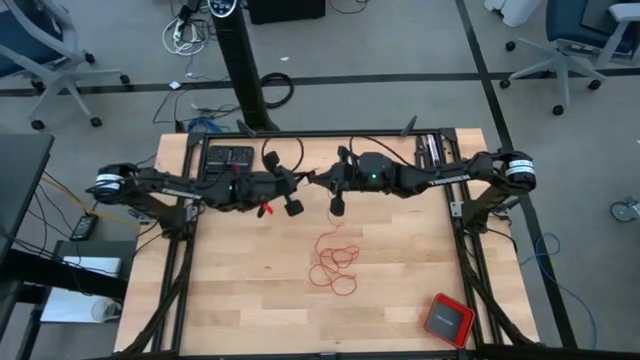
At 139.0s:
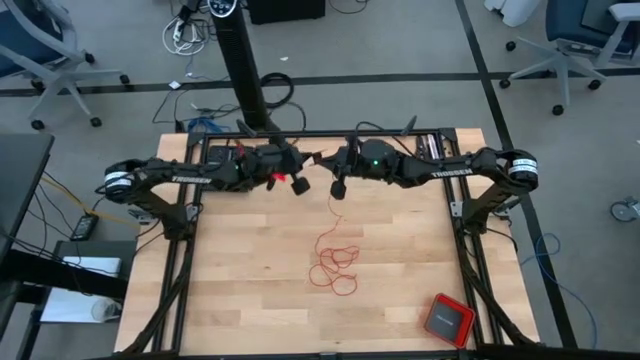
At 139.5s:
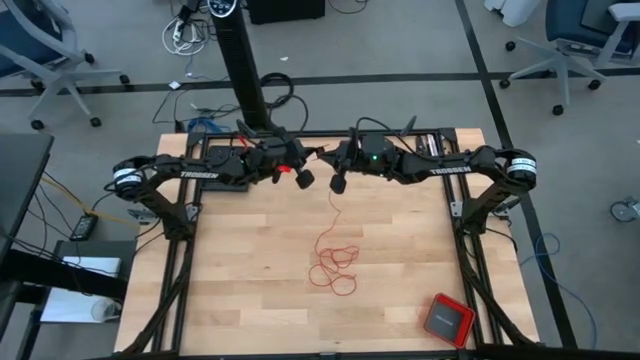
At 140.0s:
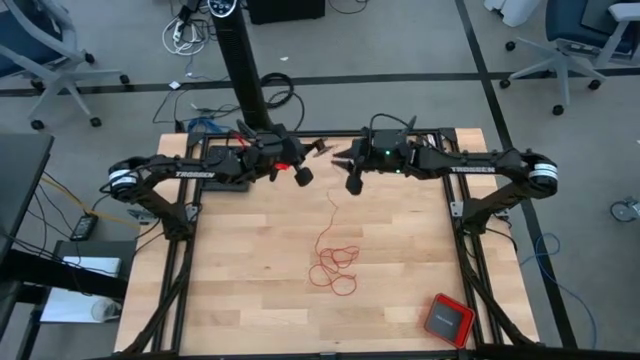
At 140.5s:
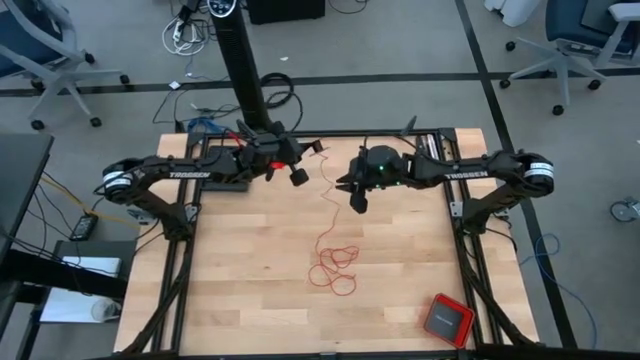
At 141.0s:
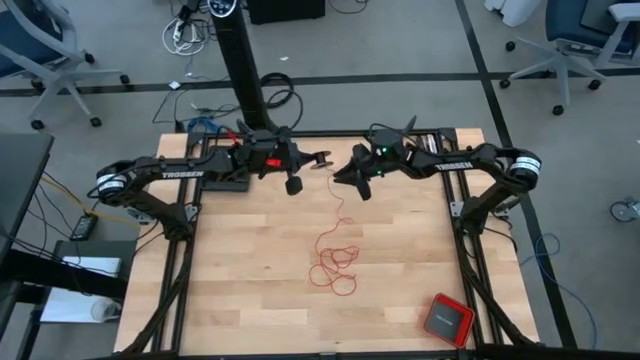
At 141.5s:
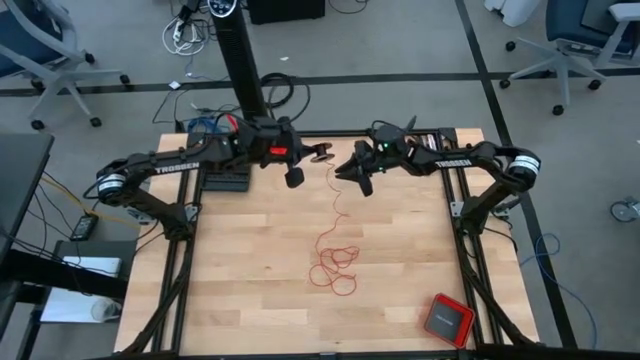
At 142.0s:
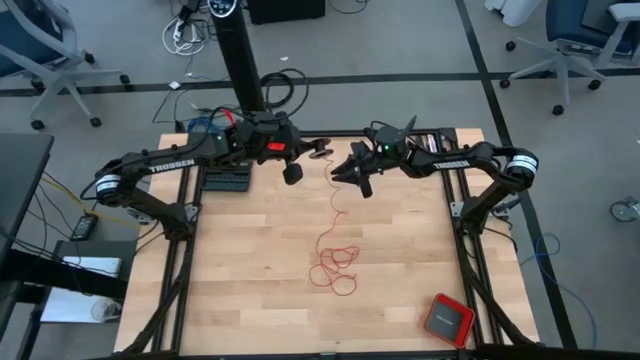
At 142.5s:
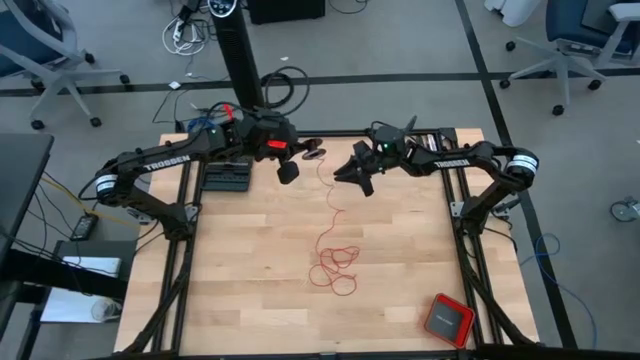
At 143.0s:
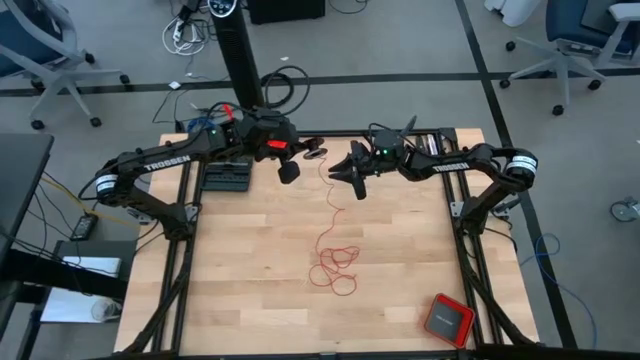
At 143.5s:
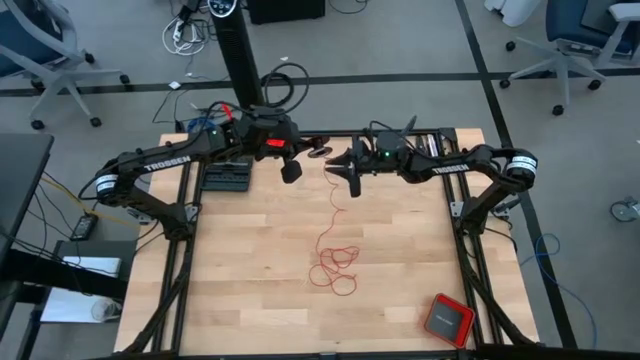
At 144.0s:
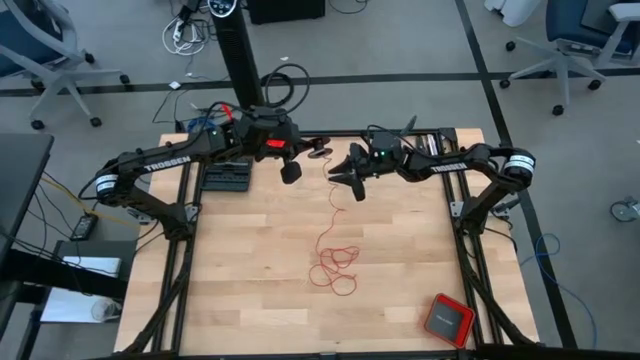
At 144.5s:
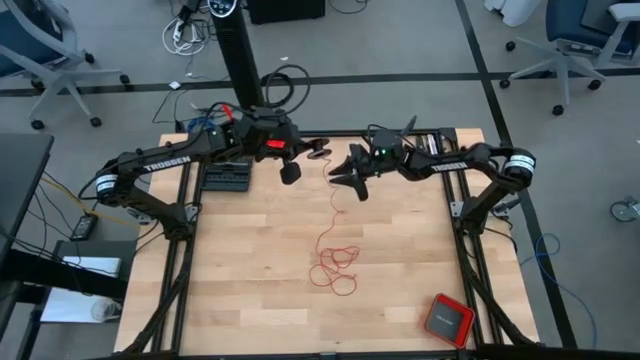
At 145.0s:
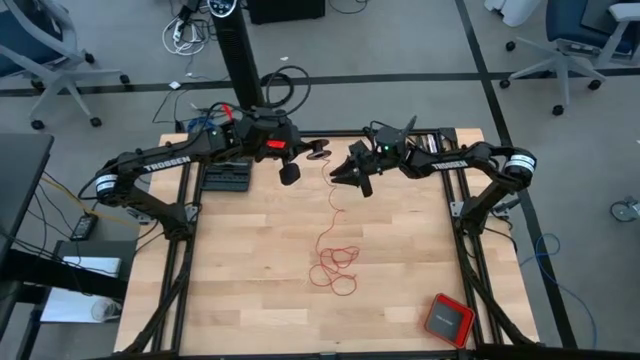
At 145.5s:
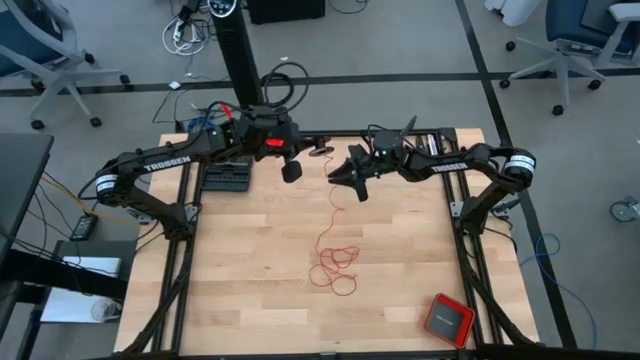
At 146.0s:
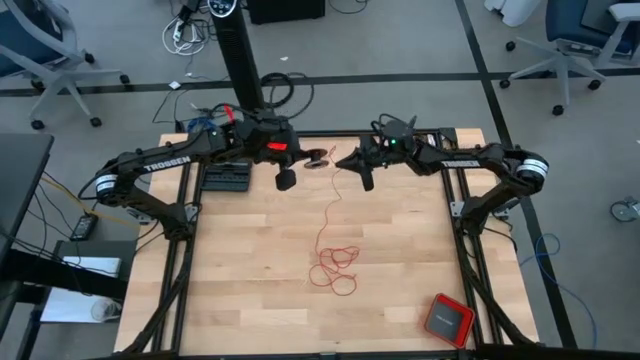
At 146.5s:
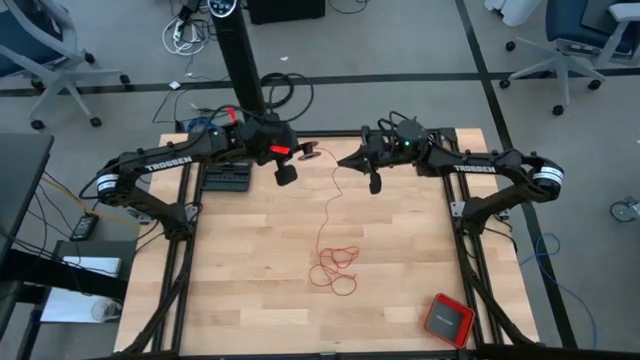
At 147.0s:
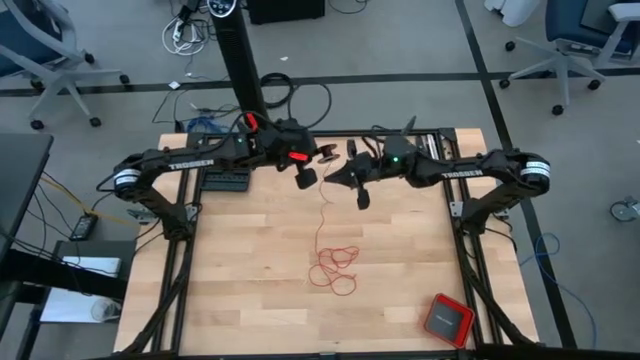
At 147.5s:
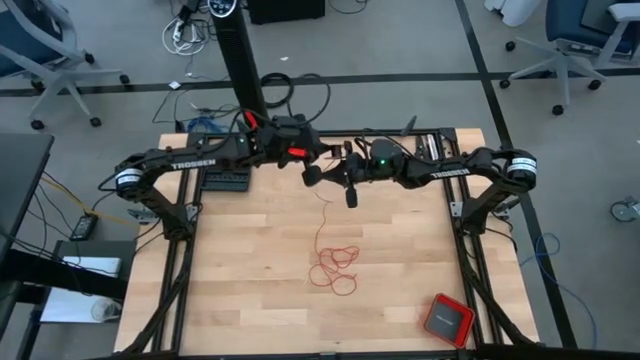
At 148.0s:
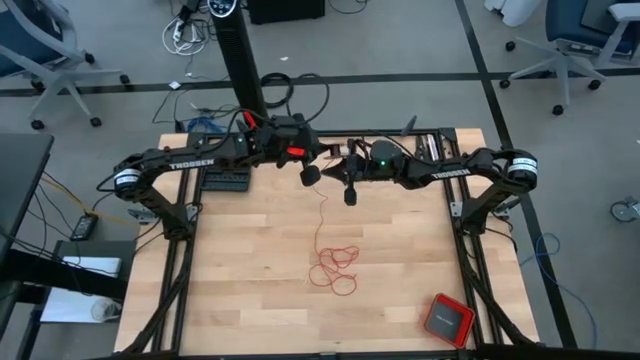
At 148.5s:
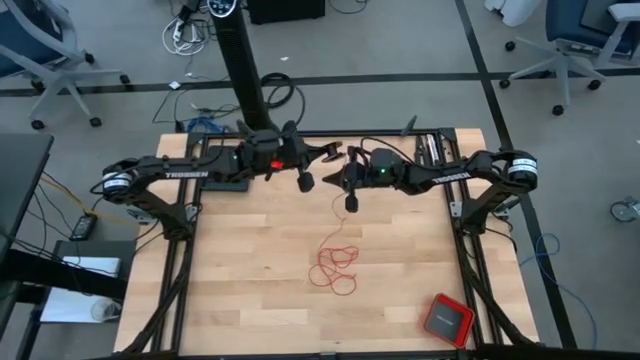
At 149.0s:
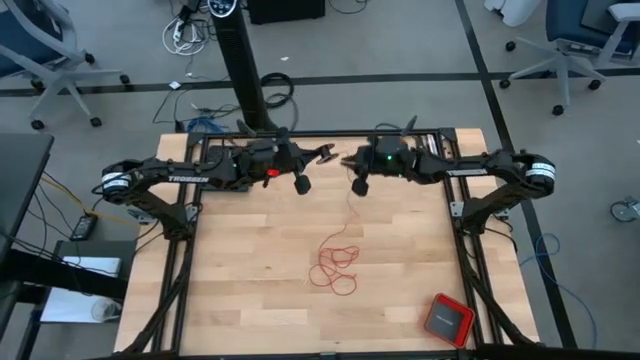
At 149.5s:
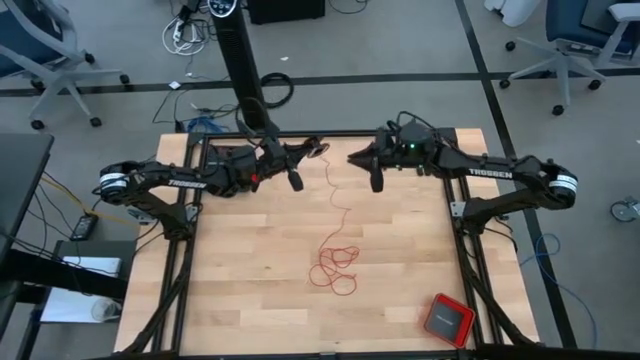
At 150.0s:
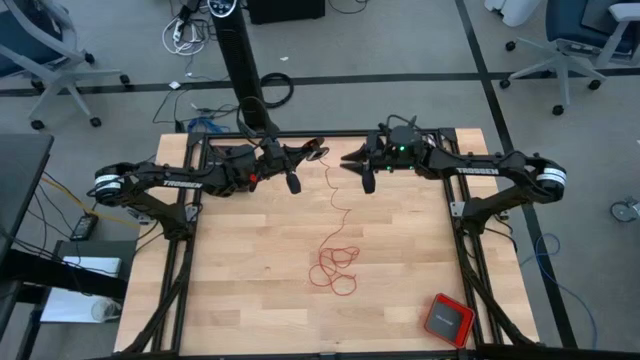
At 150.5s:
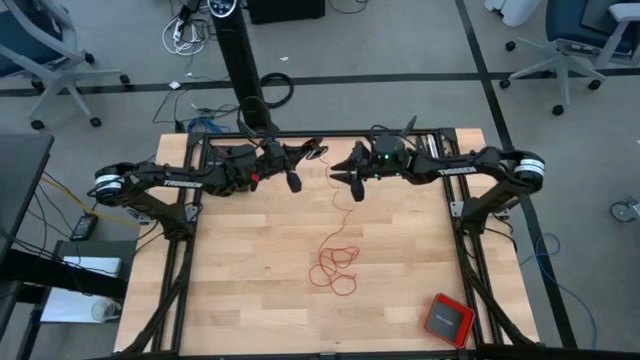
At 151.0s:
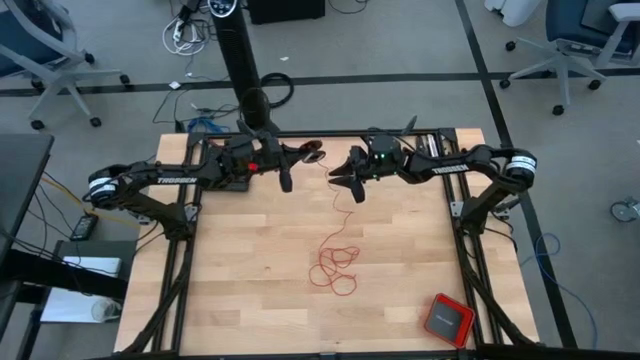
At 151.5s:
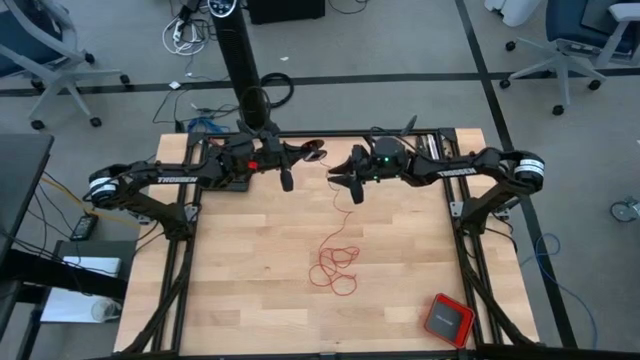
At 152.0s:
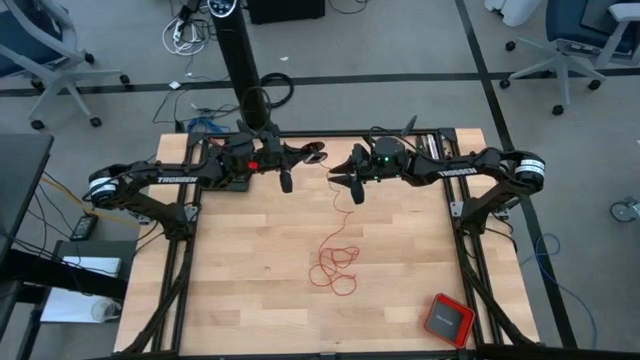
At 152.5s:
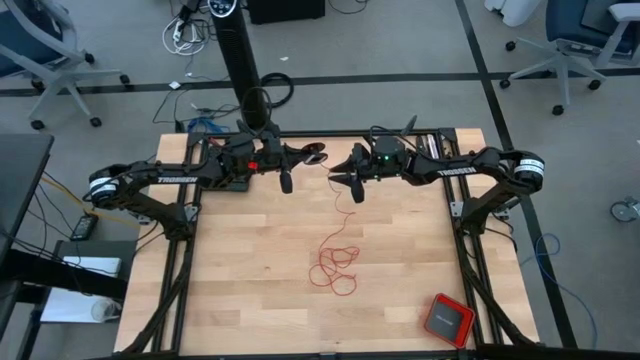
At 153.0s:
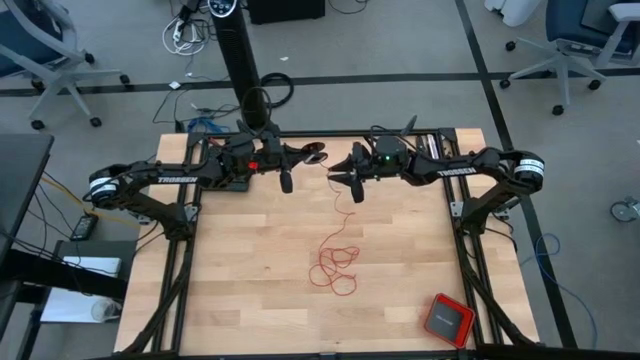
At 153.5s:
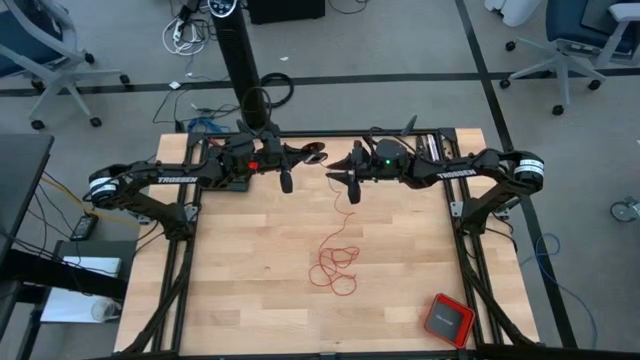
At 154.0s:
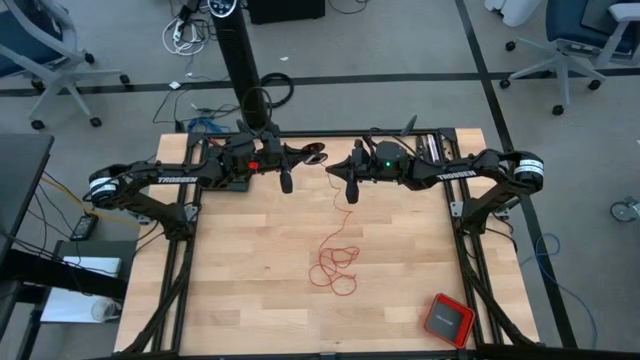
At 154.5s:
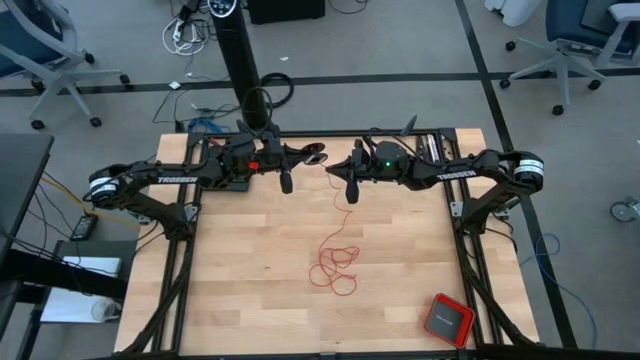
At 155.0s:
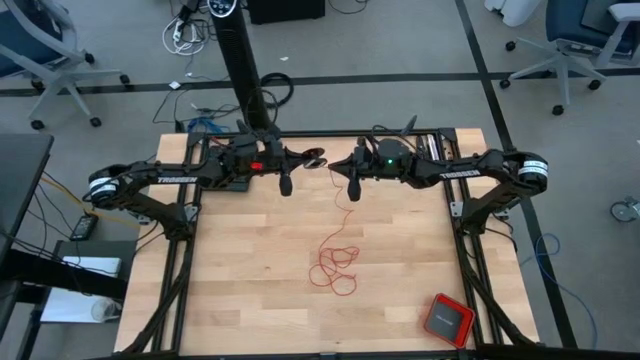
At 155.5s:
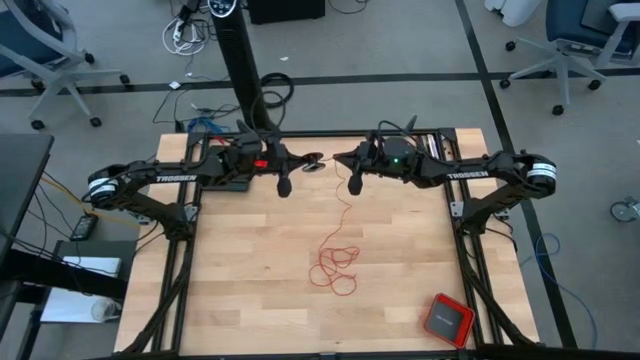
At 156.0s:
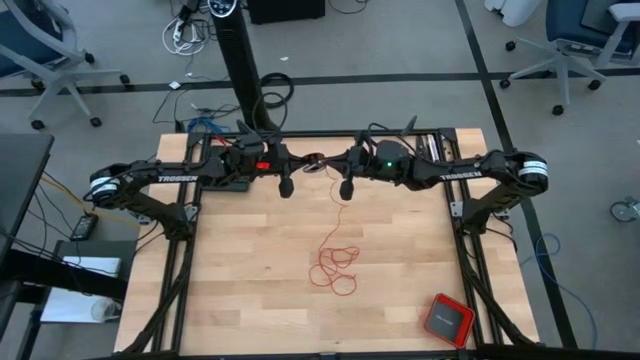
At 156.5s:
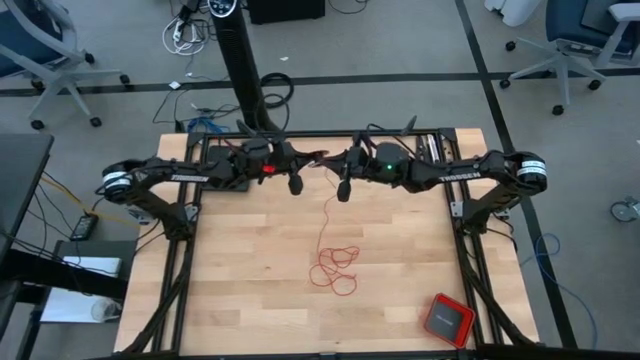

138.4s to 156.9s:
Task: Coil cords
Coil the red wire onto the spool
